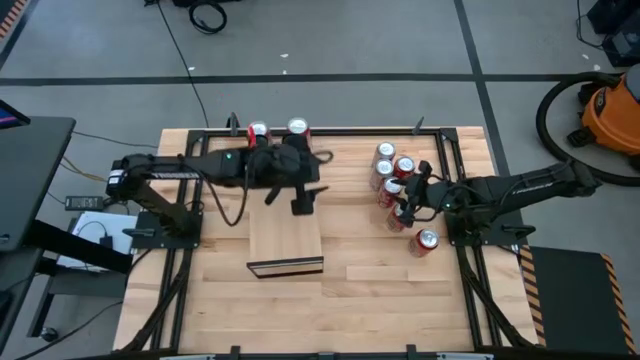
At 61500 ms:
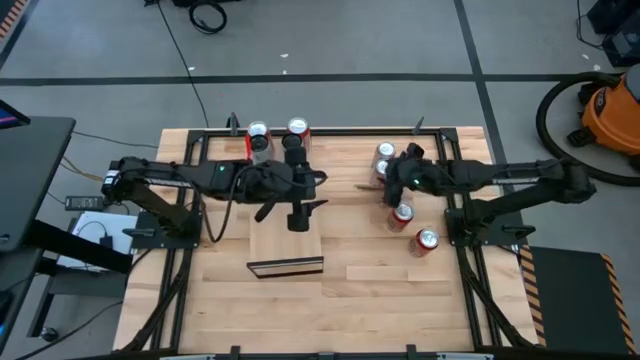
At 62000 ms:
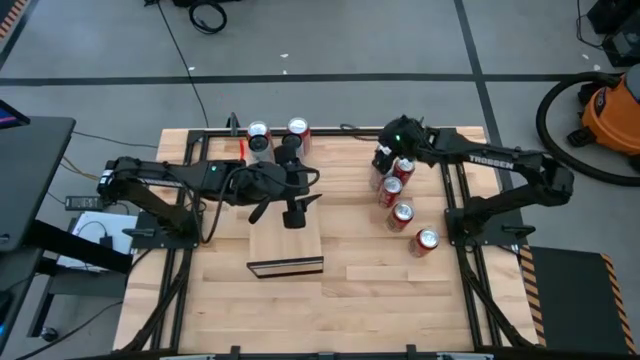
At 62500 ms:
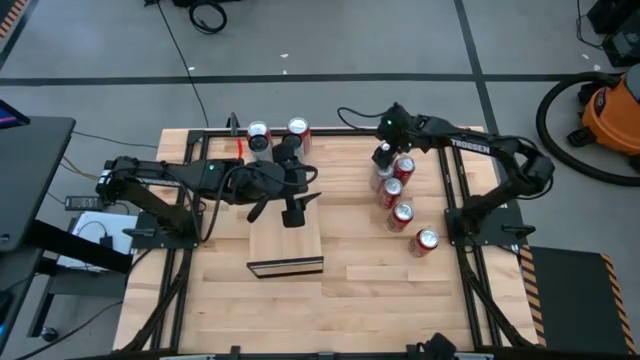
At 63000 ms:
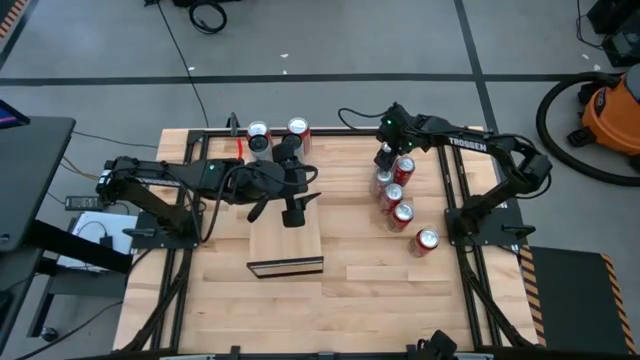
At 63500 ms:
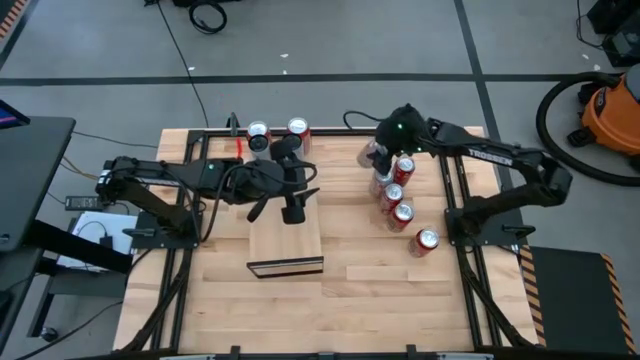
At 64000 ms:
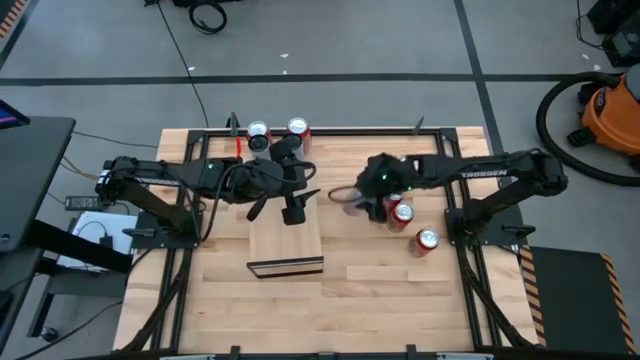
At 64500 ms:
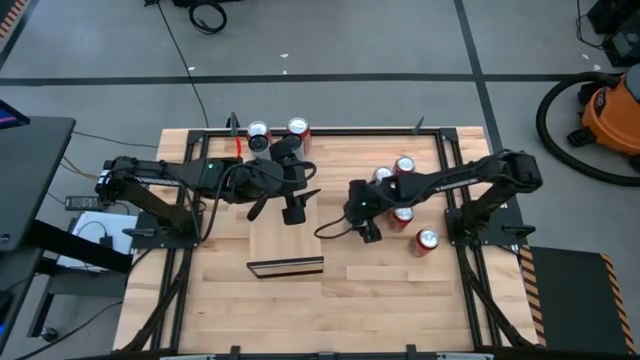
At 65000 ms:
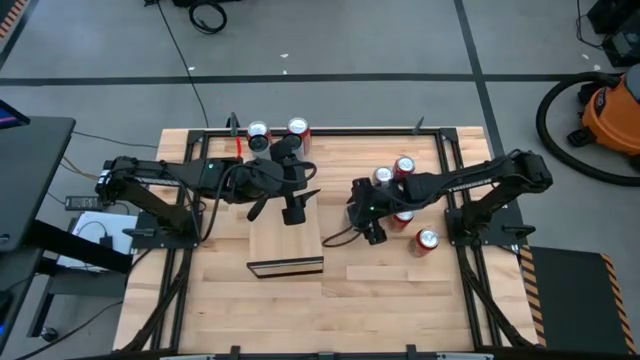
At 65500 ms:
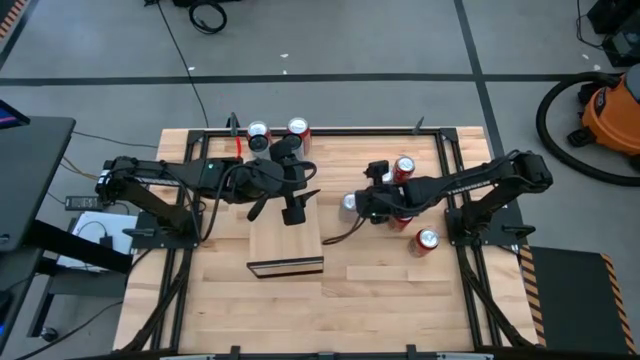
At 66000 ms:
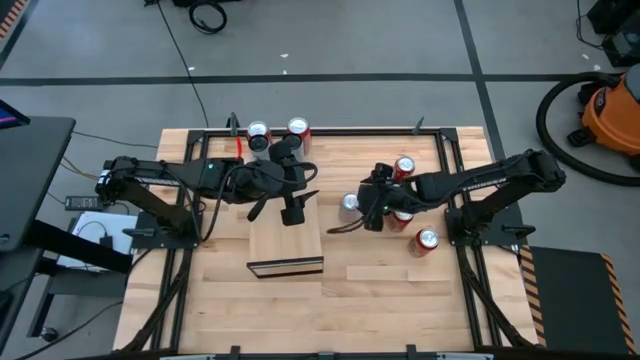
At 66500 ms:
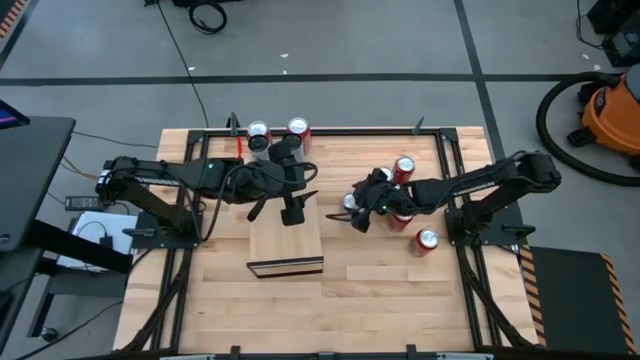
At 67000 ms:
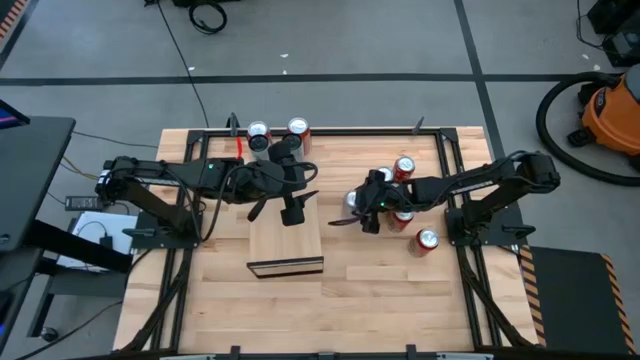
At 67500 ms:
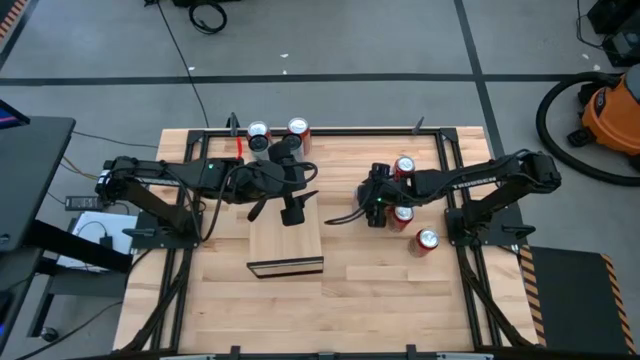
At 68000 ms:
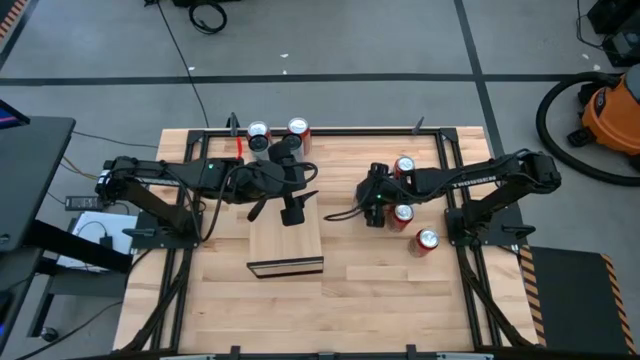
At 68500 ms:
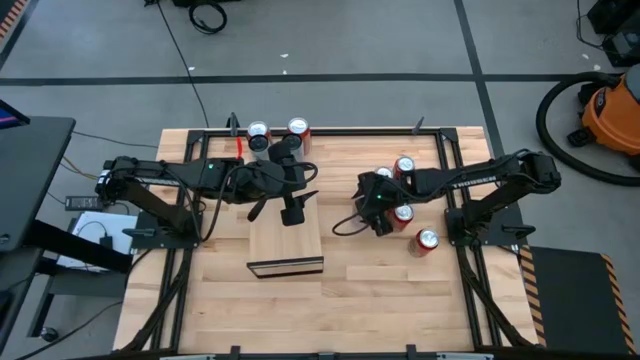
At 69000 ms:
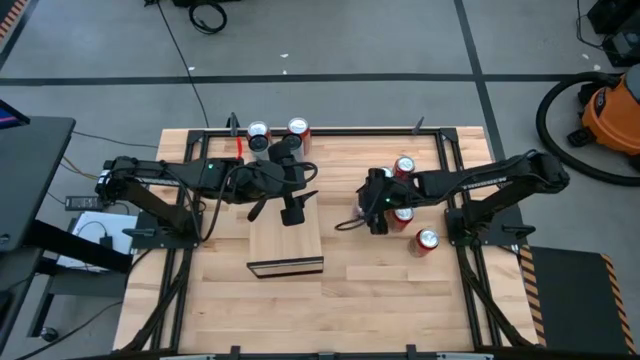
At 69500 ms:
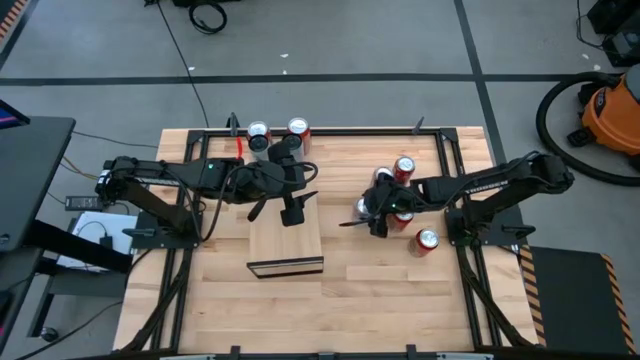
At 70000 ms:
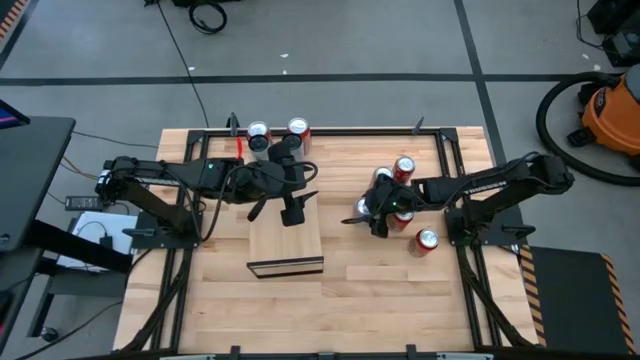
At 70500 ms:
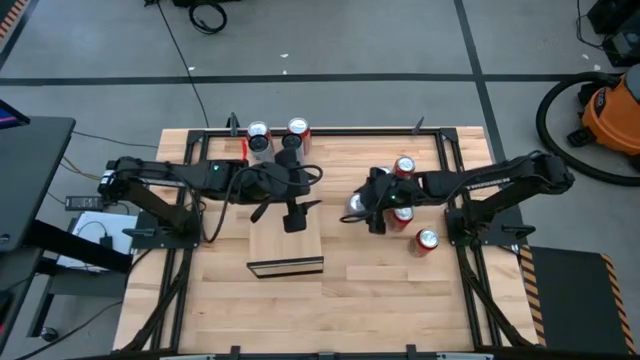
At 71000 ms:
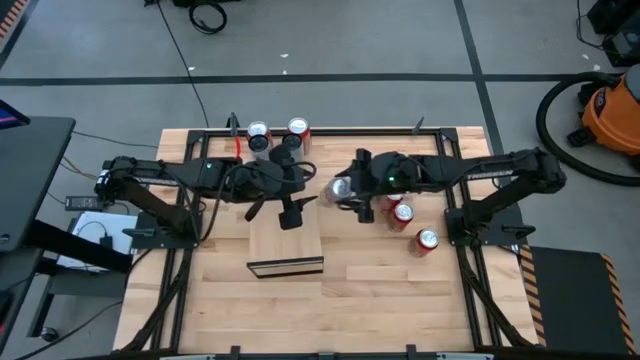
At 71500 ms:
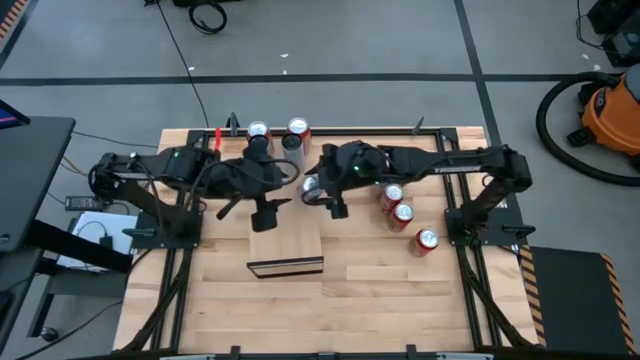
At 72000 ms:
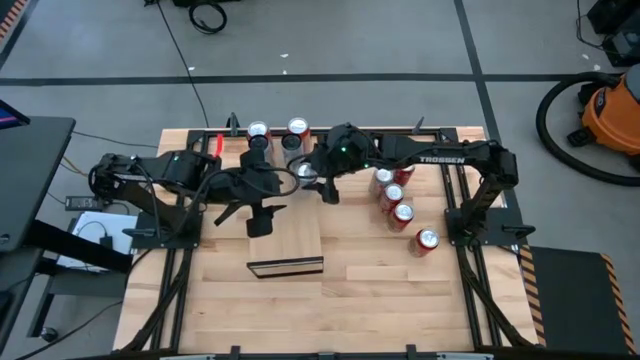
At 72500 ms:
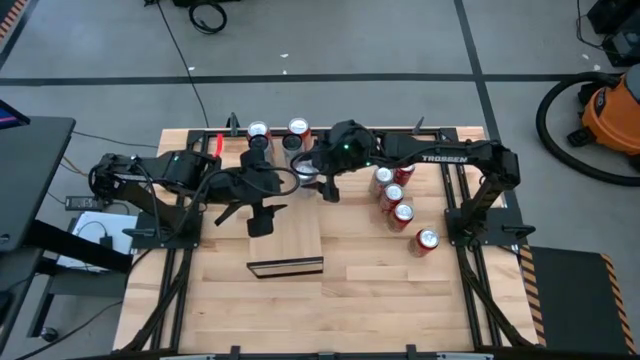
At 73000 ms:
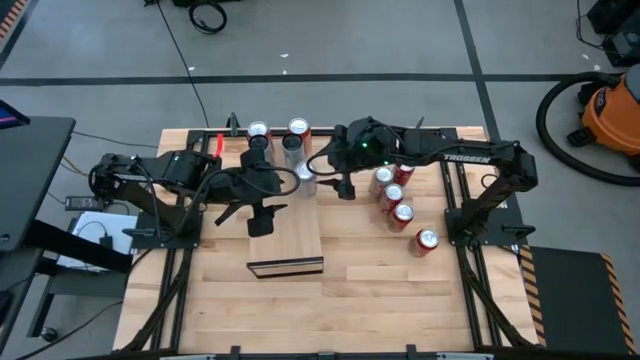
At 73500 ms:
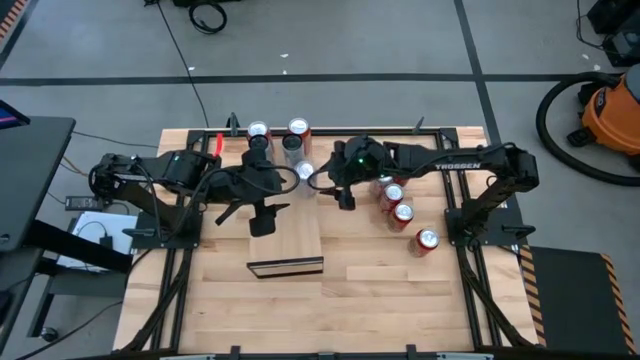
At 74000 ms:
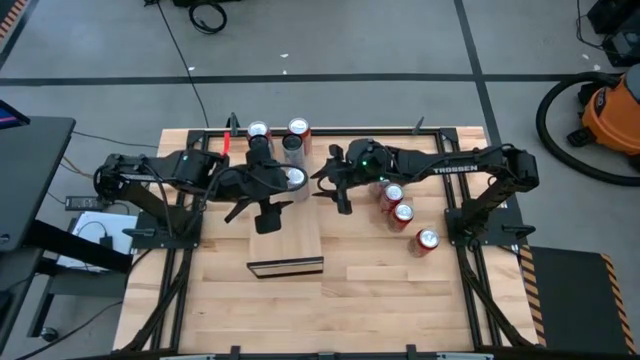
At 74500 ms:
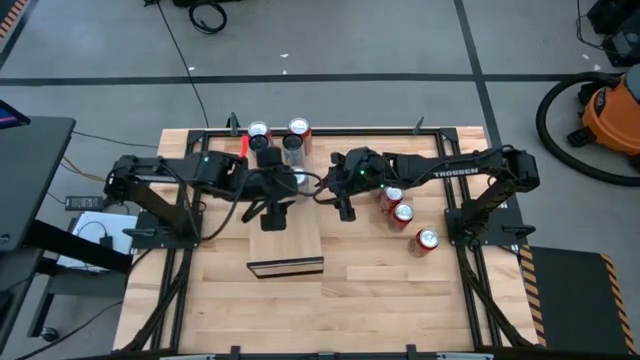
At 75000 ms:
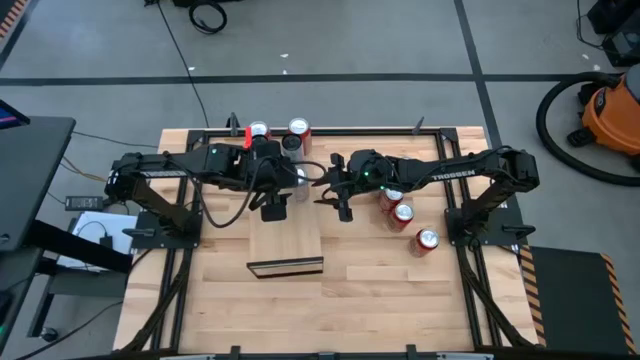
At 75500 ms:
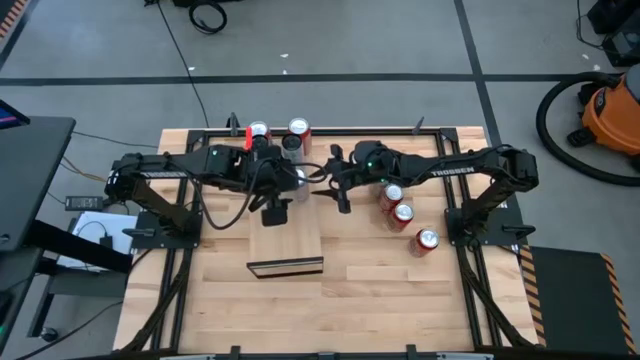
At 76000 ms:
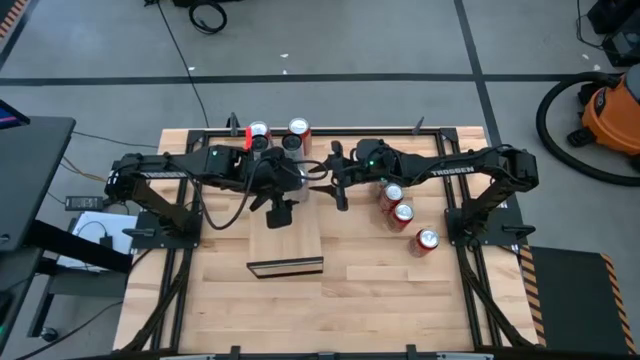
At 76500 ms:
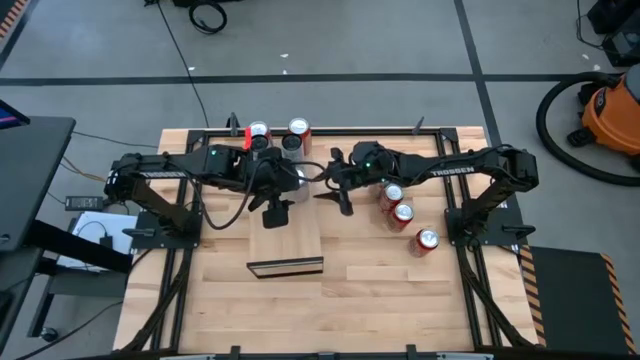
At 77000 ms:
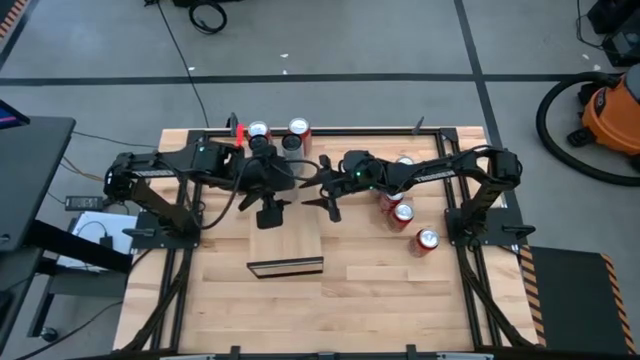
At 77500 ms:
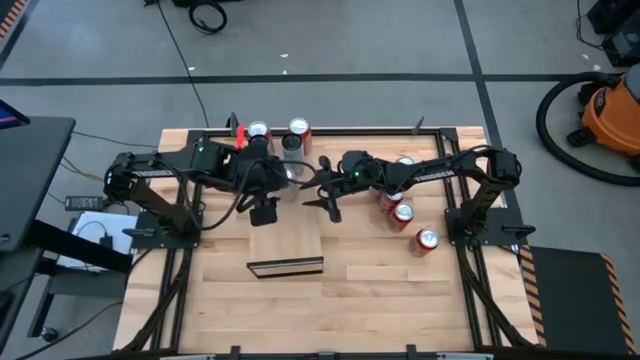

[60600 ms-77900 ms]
Task: Place canned beverage on shelf
Put the top red and silver soda can on the shelf

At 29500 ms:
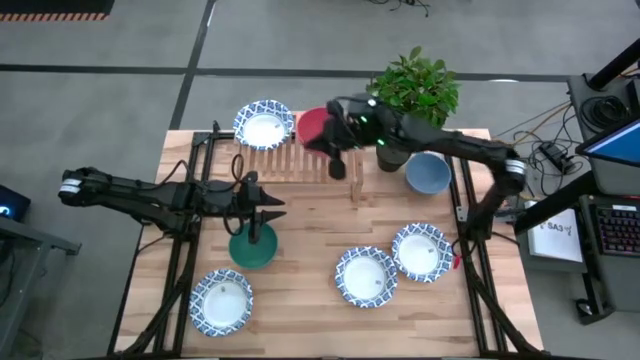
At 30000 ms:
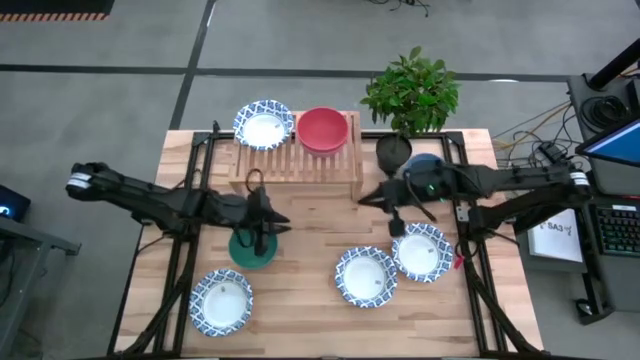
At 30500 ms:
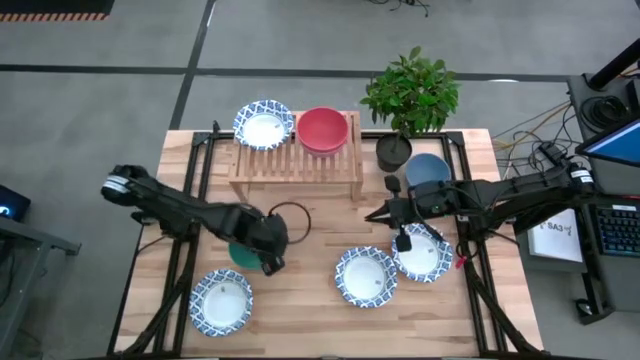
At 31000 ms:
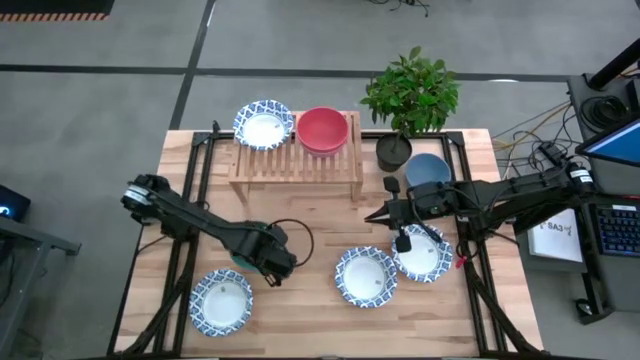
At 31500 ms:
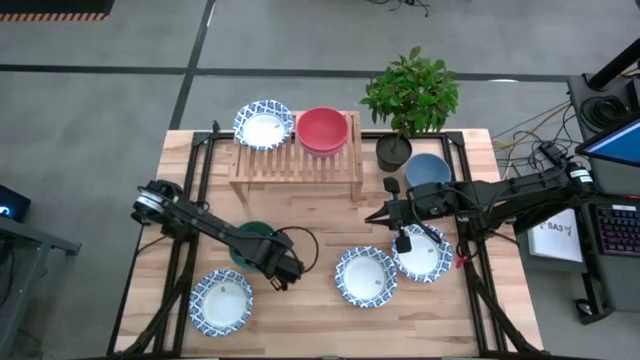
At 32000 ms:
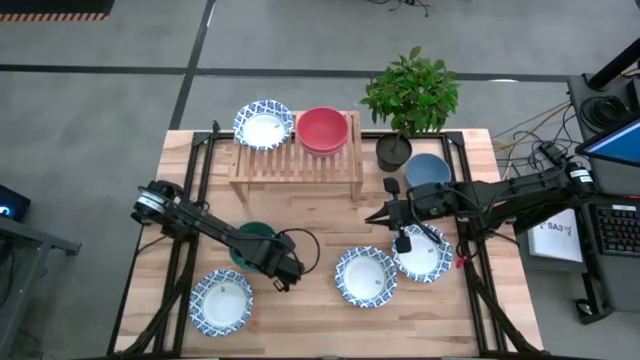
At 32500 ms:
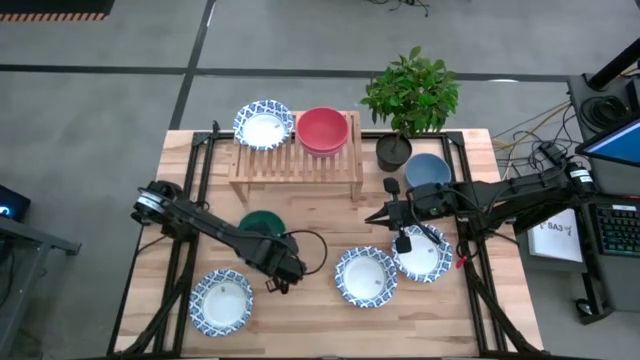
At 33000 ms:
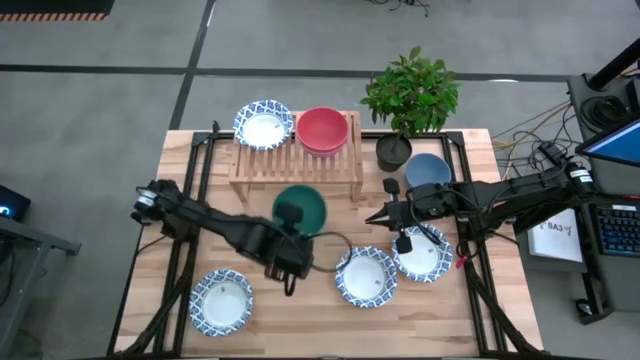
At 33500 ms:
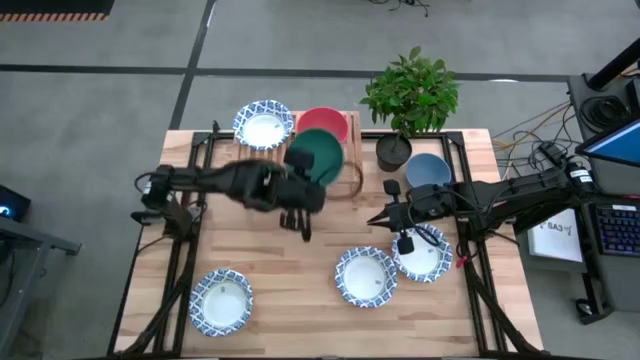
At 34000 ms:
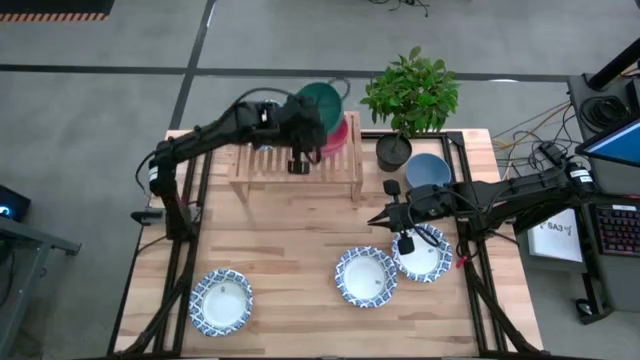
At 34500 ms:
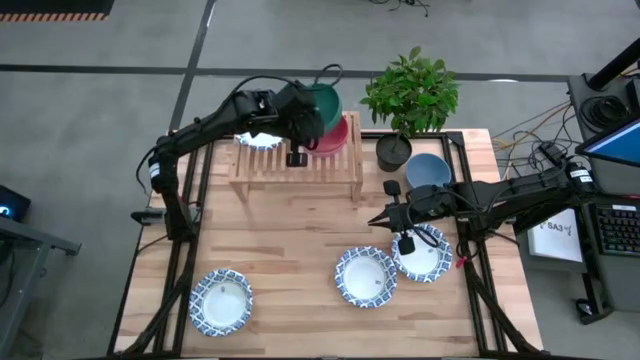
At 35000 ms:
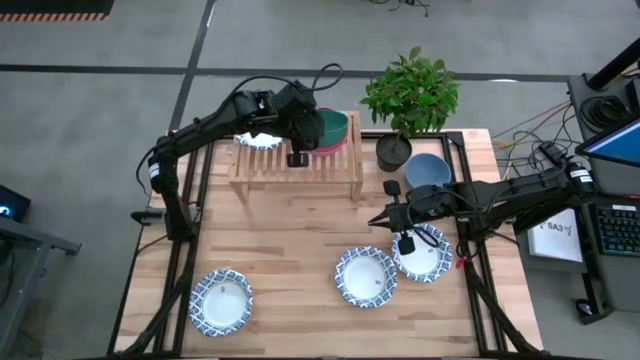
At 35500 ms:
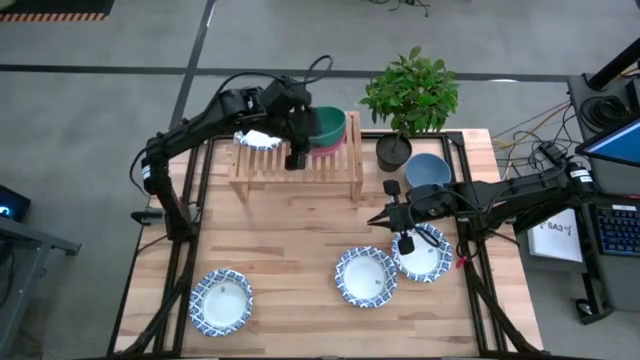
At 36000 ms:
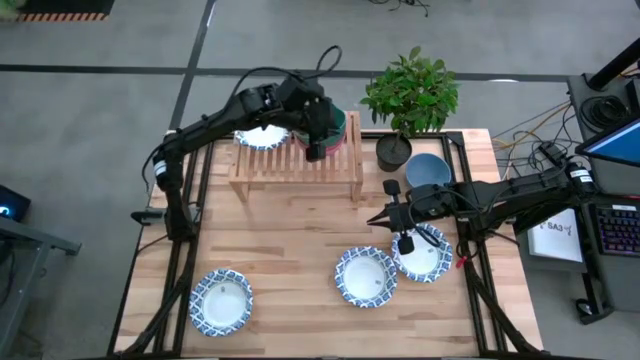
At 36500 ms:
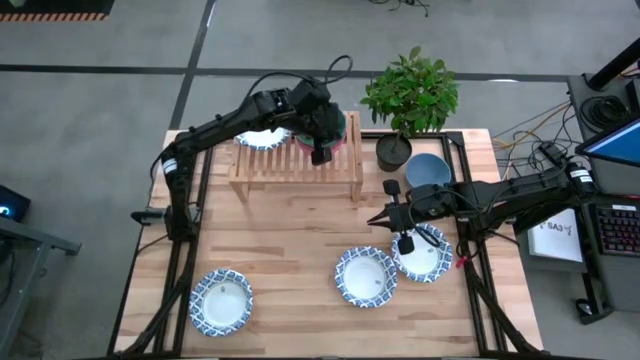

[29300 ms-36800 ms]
Task: Place and stack bowls onto a shelf
Stack the green bowl on top of the orange bowl on the shelf
